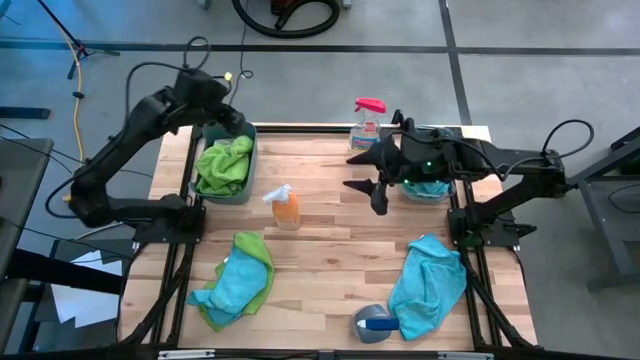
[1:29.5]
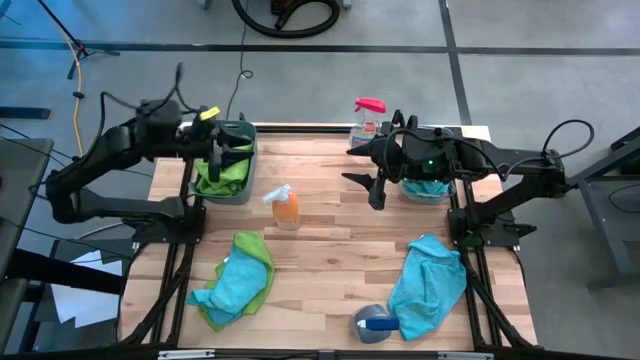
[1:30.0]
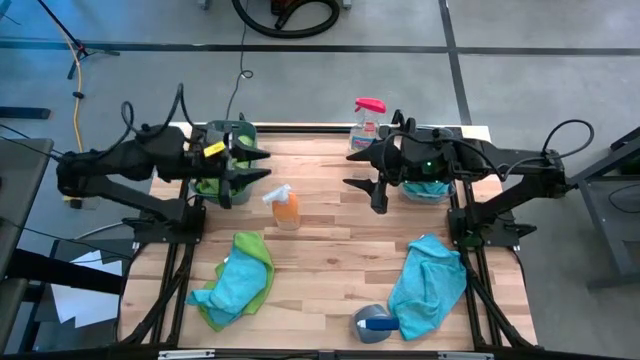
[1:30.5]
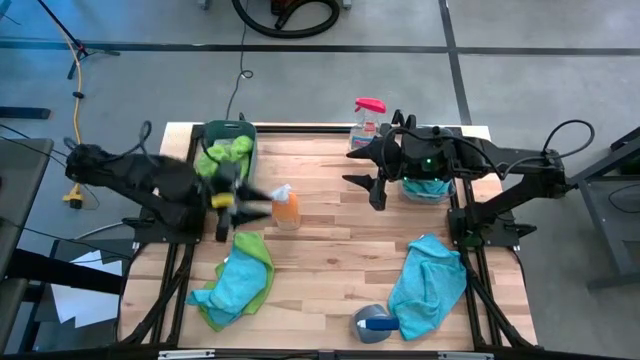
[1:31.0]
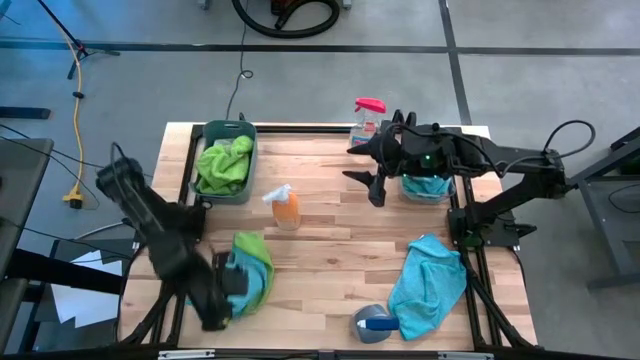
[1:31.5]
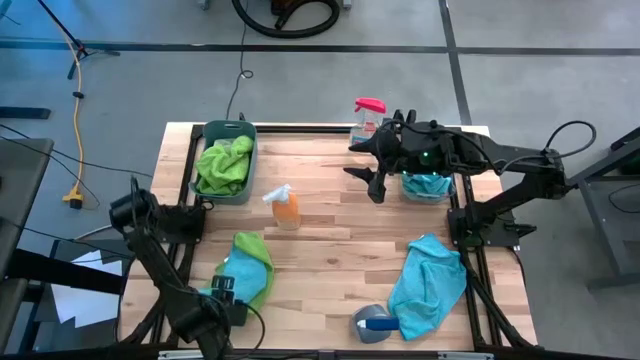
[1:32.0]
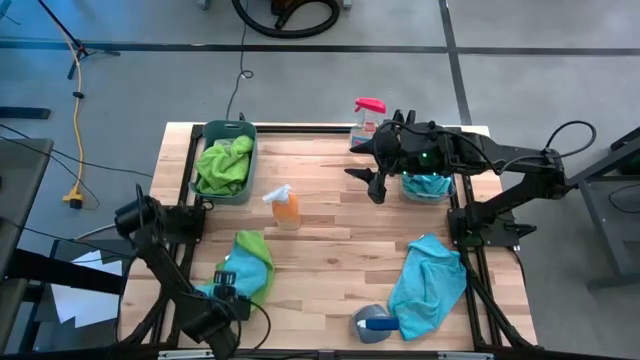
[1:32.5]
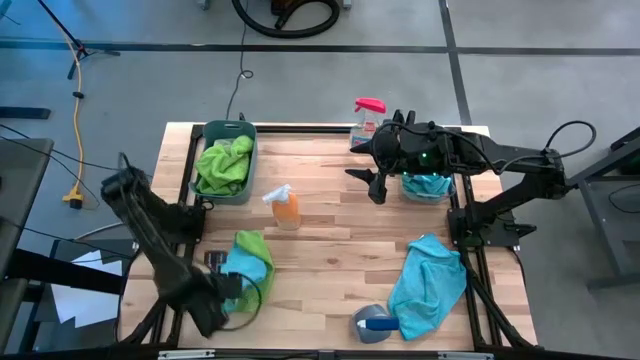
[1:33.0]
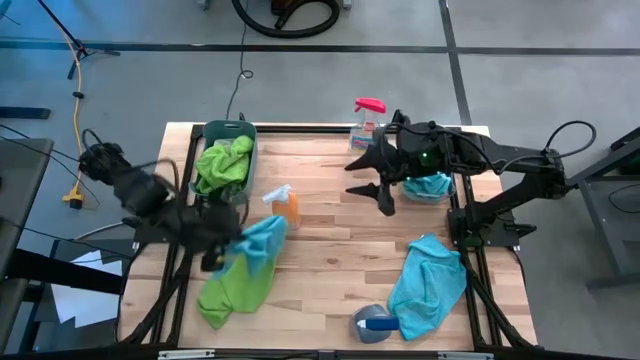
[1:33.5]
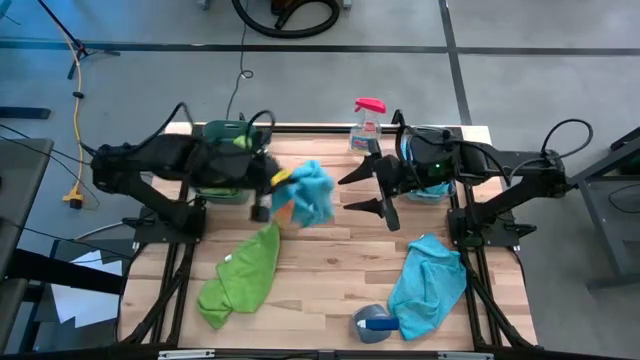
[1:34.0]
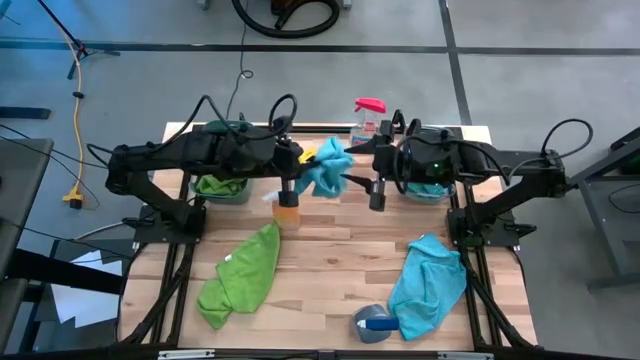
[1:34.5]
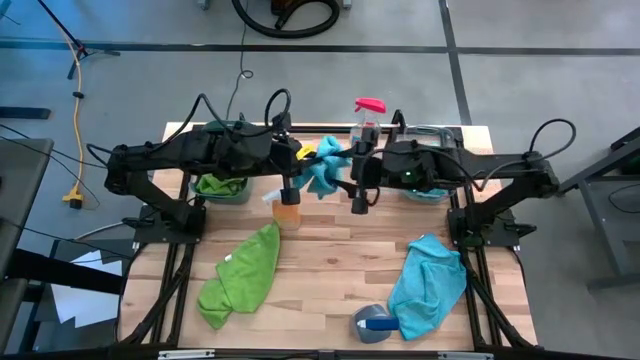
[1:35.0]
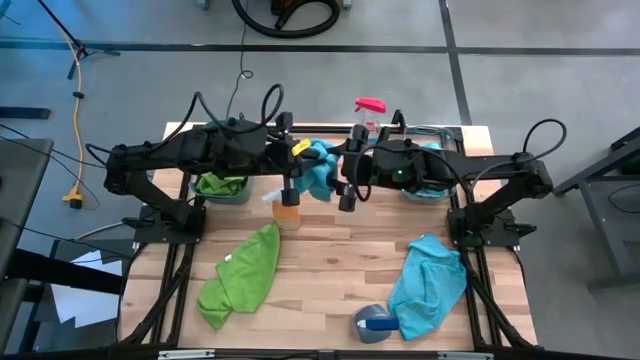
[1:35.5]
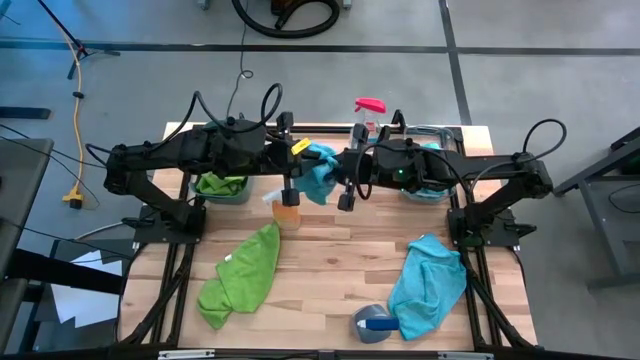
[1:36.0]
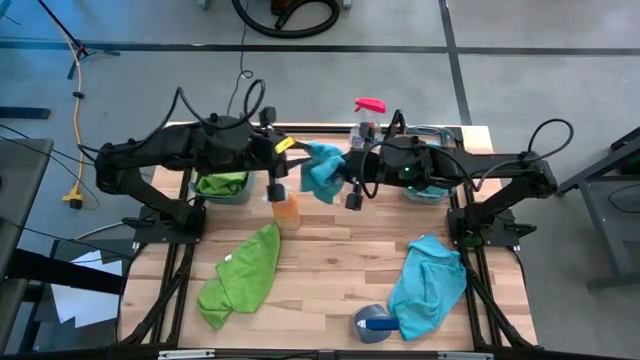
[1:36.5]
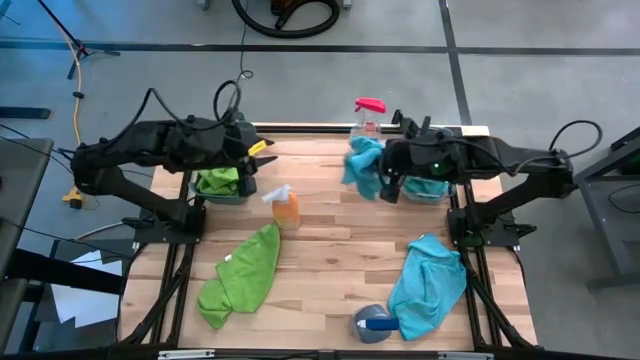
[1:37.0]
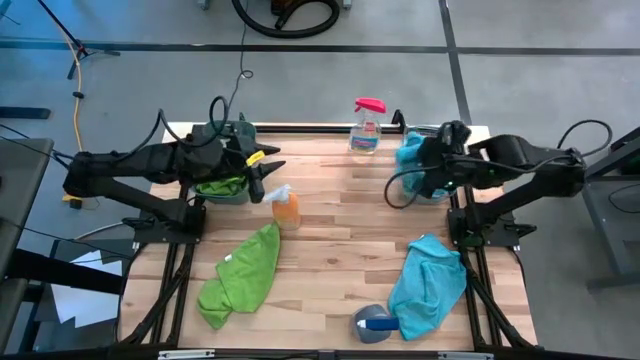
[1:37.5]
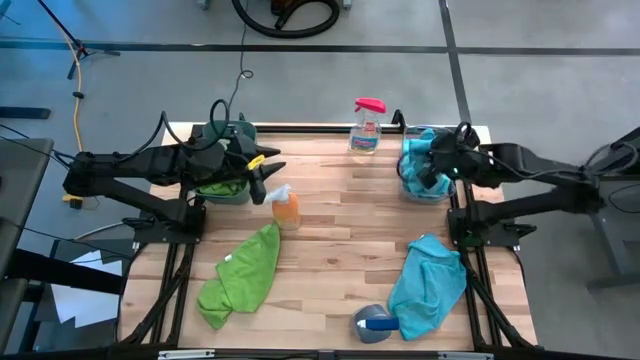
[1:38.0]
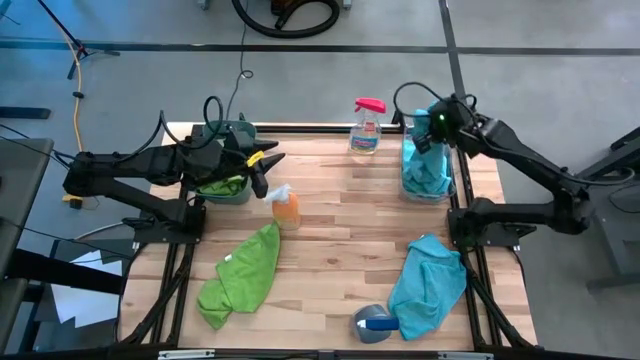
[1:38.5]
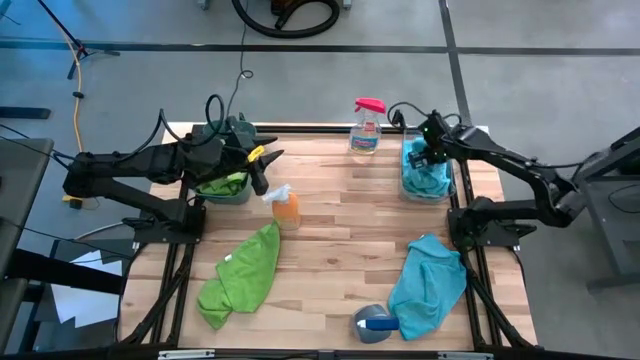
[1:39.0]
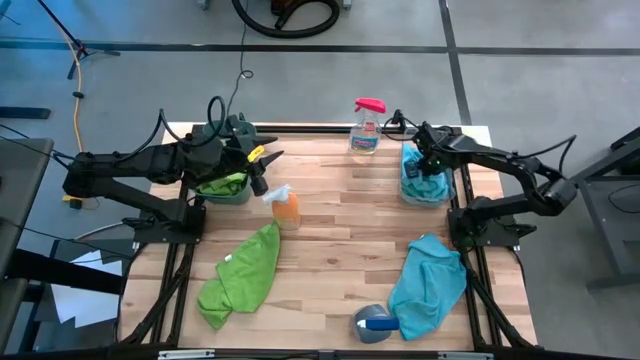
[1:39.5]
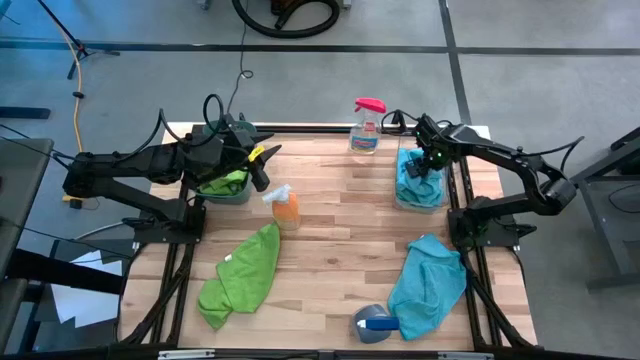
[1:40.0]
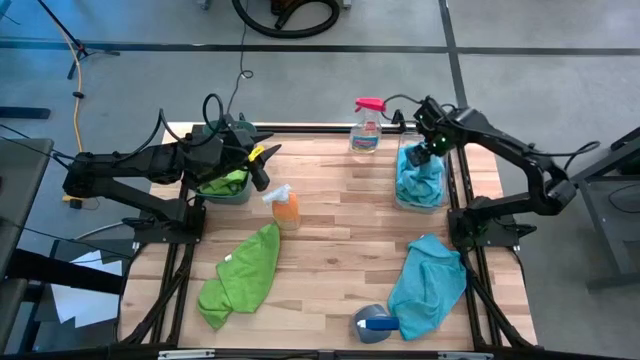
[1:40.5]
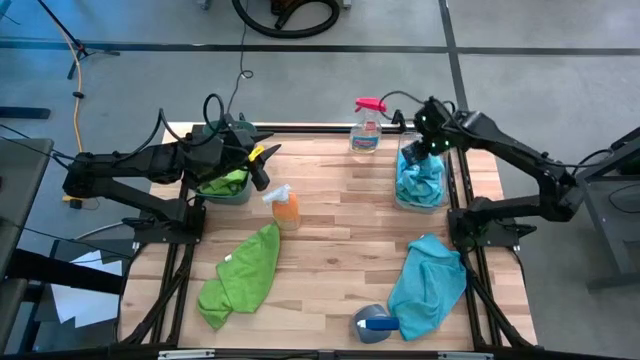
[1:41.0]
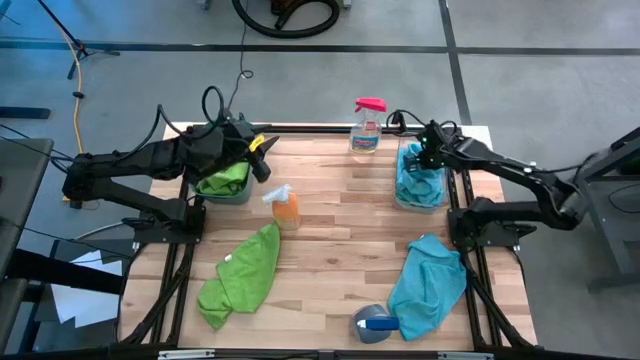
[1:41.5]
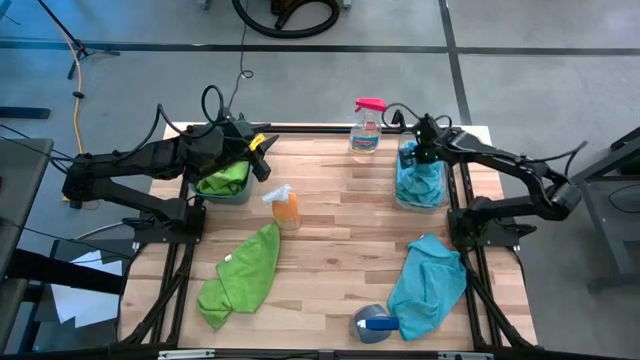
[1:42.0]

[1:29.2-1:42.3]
Task: Sort microfiber towel by color & place in baskets
Put the blue microfiber towel into the transparent bin

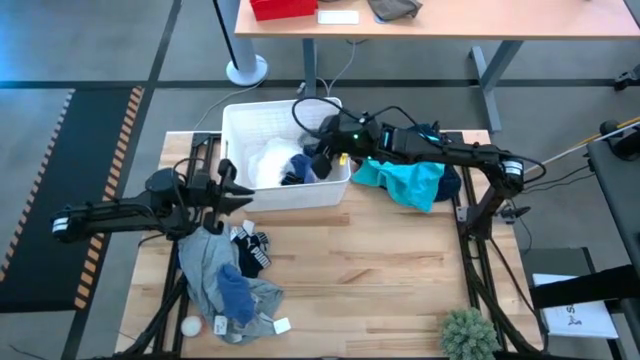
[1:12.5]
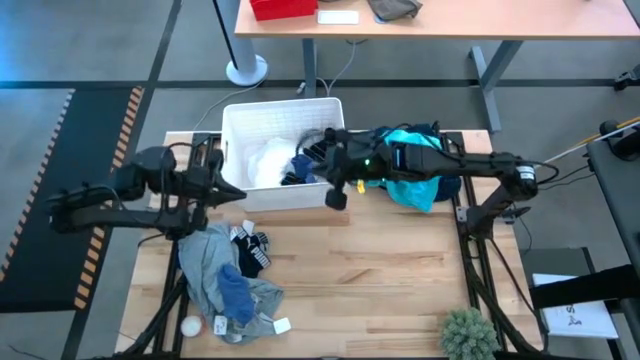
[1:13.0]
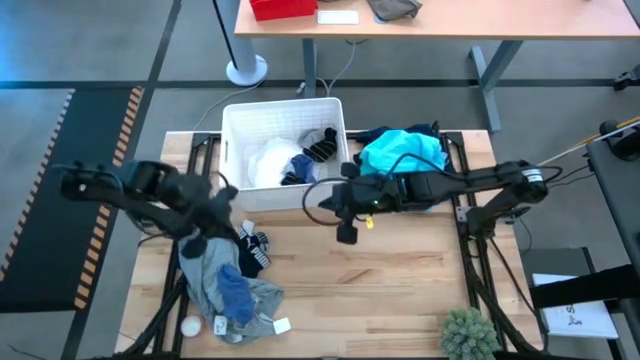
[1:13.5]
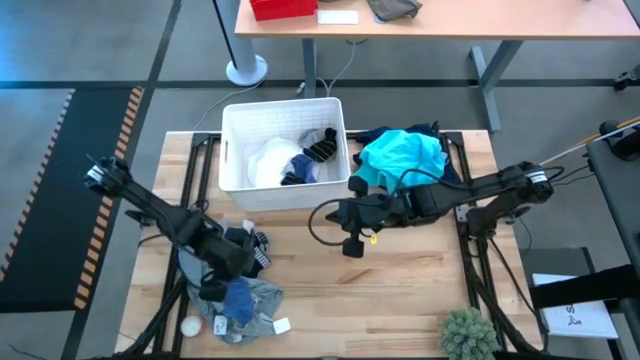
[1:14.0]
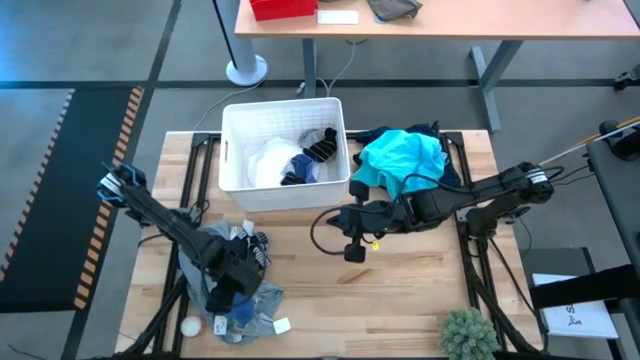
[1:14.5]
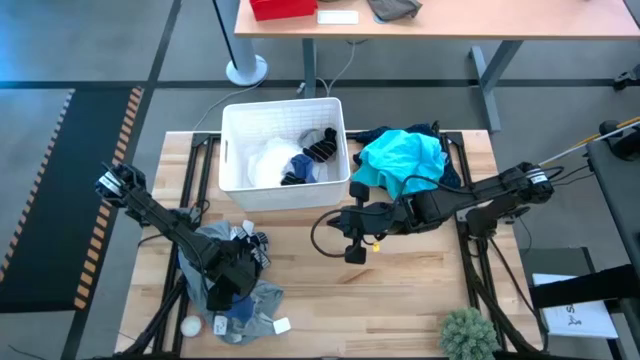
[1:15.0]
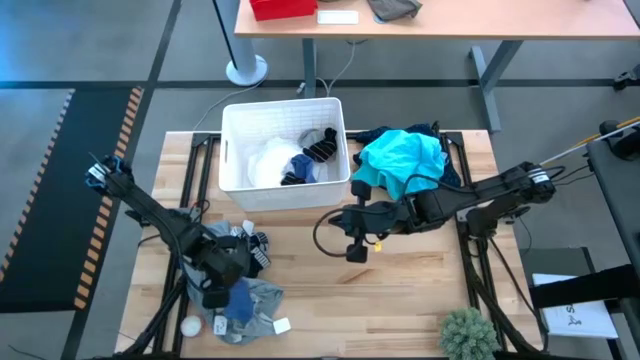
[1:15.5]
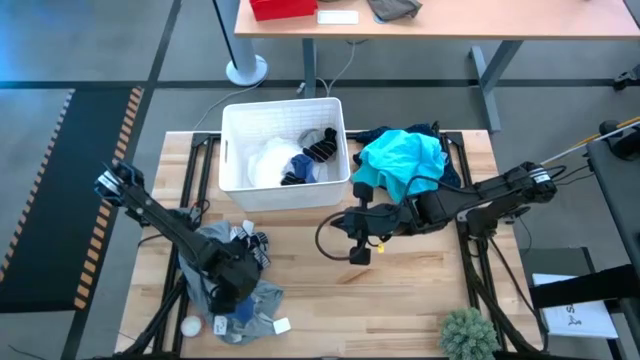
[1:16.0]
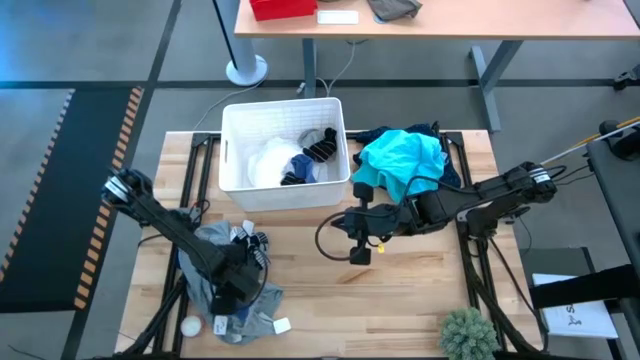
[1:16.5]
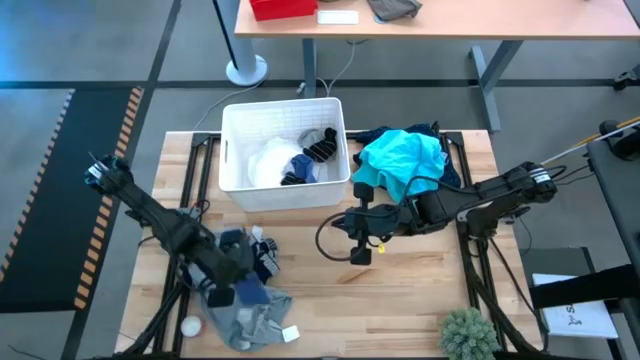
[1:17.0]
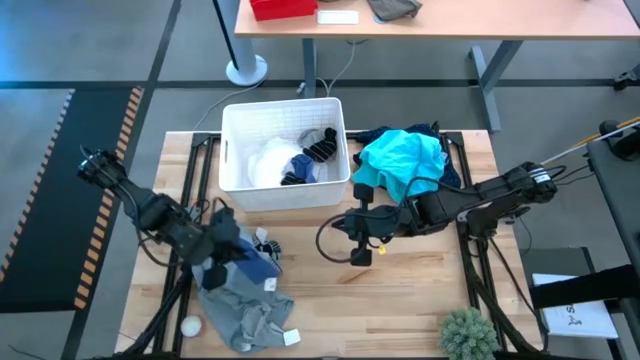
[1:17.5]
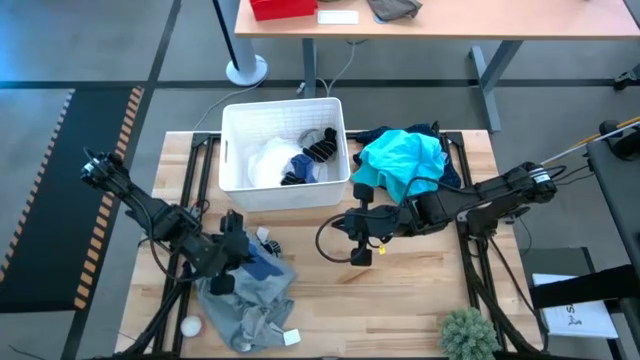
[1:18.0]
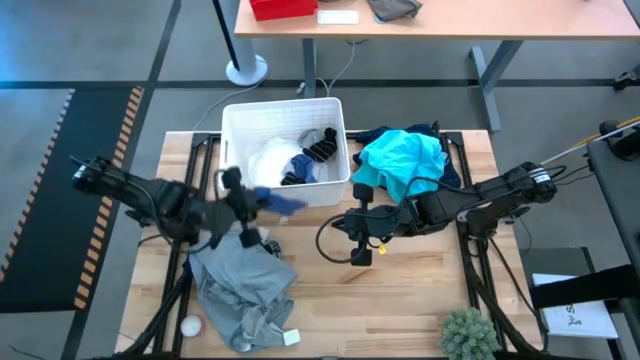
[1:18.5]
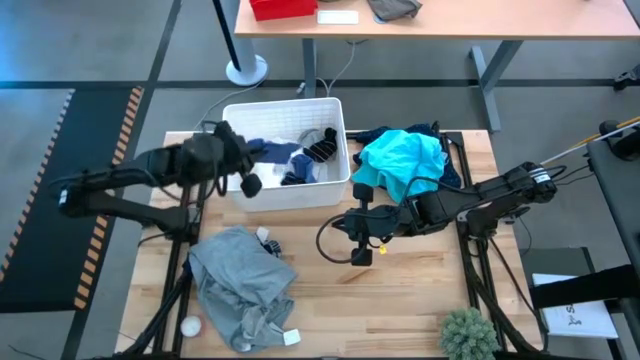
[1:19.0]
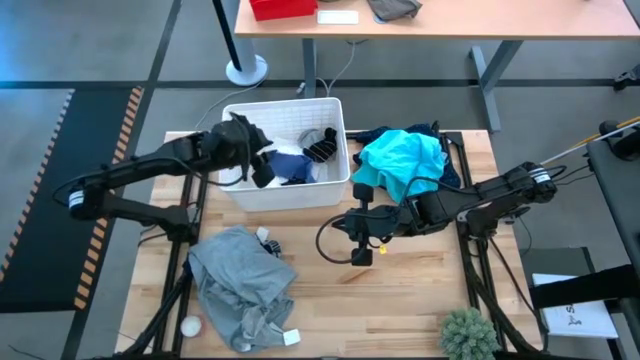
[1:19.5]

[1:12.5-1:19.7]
Task: Sort clothes
Put the blue sock into the white bin
